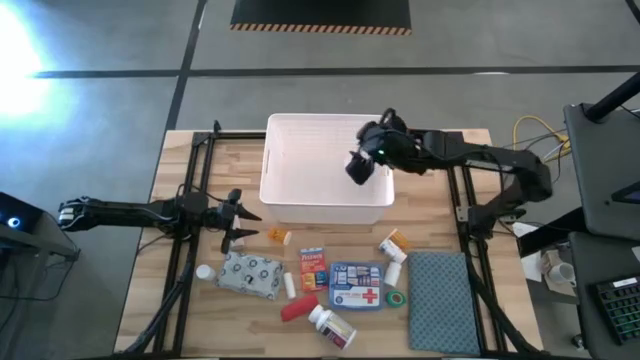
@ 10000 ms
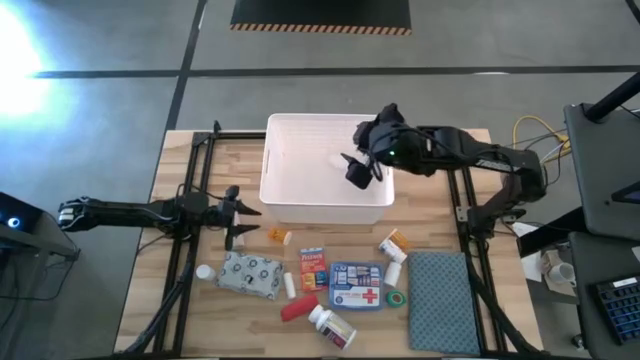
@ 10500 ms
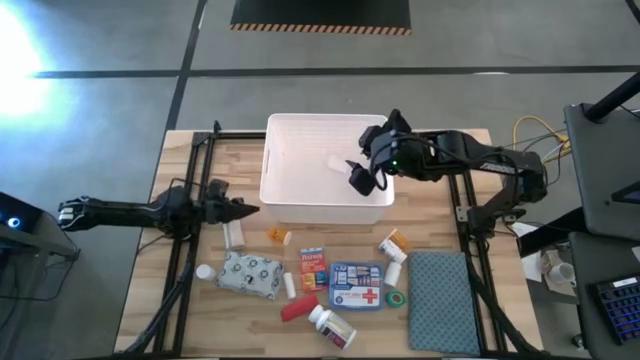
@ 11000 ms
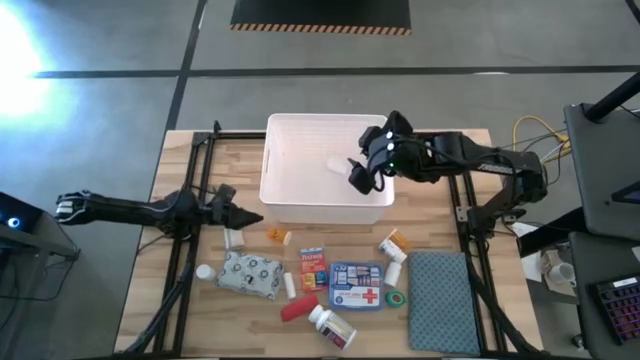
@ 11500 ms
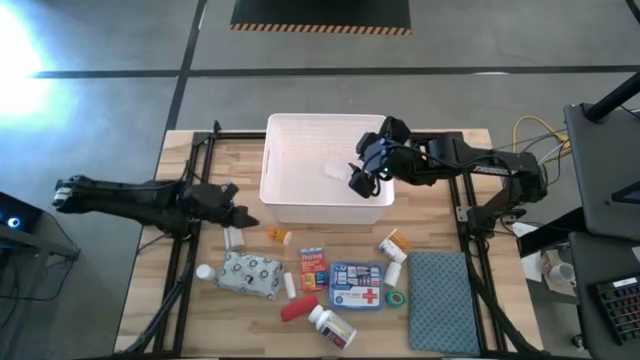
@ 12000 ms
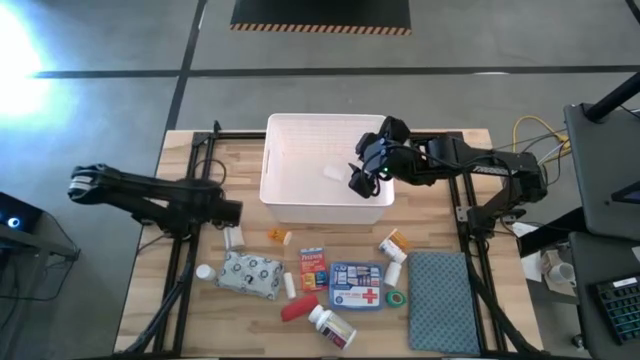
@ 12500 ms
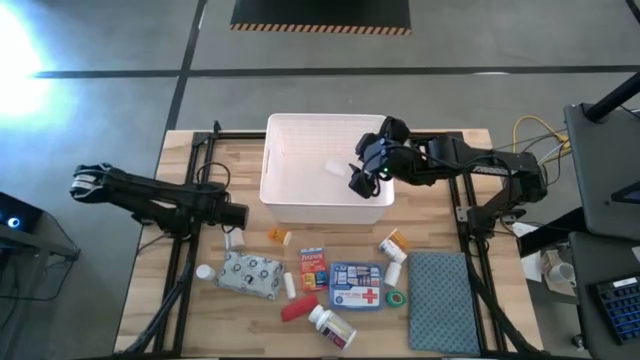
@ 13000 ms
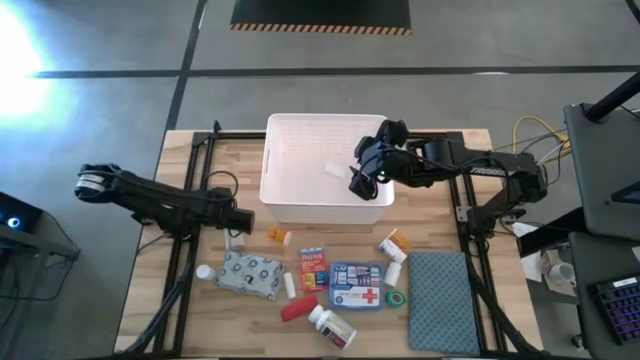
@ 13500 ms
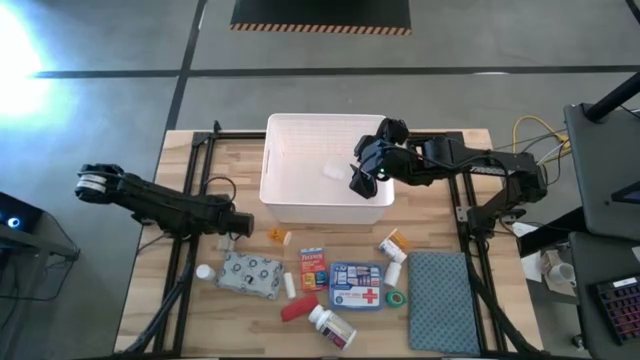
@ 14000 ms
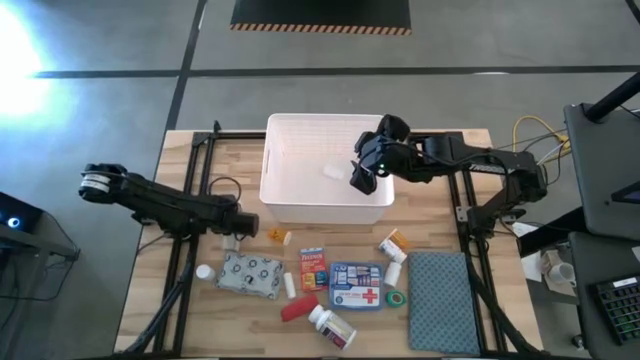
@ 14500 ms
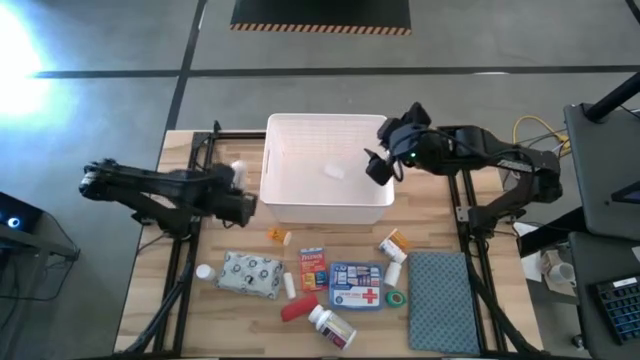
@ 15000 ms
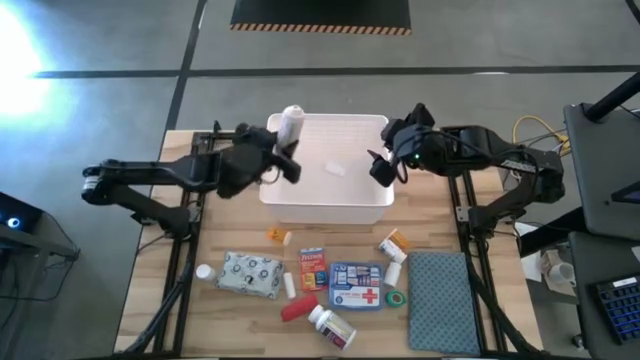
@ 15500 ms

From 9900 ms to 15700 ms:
Task: Pick & place medical supplies in basket/bin
Put the white bandage into the white bin

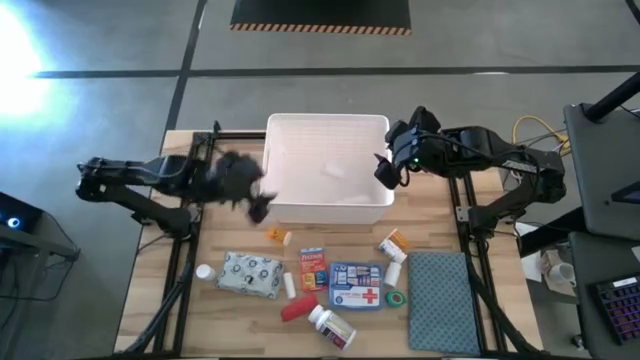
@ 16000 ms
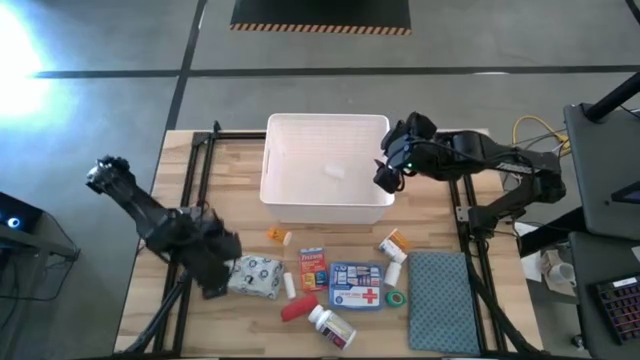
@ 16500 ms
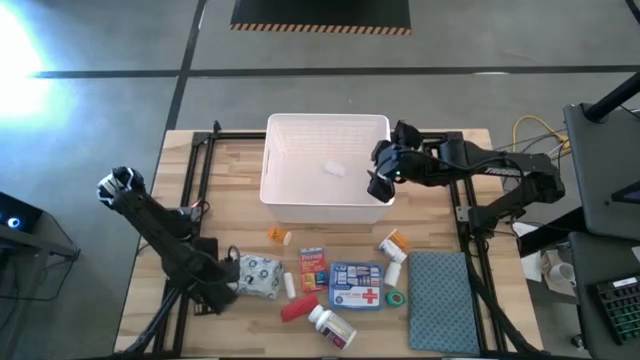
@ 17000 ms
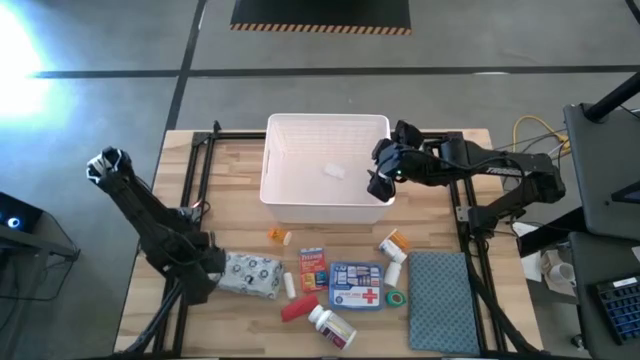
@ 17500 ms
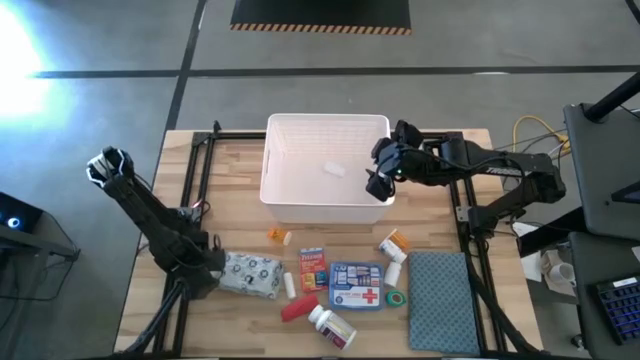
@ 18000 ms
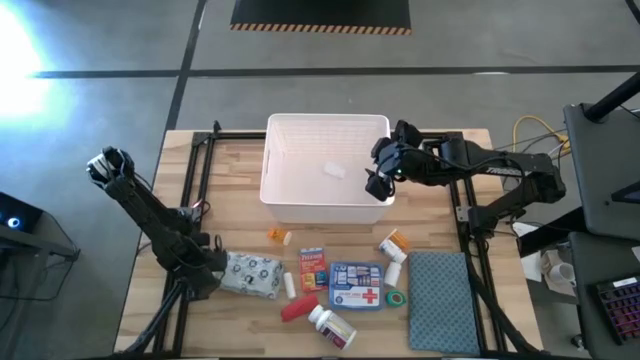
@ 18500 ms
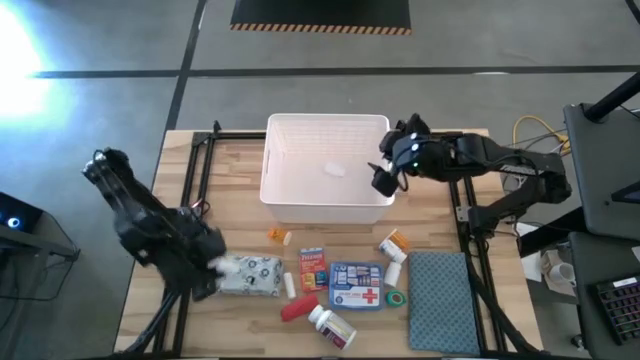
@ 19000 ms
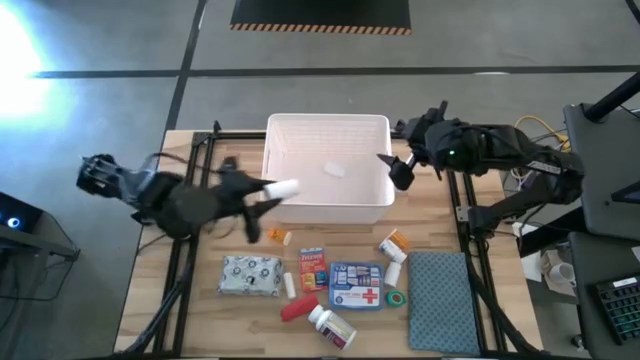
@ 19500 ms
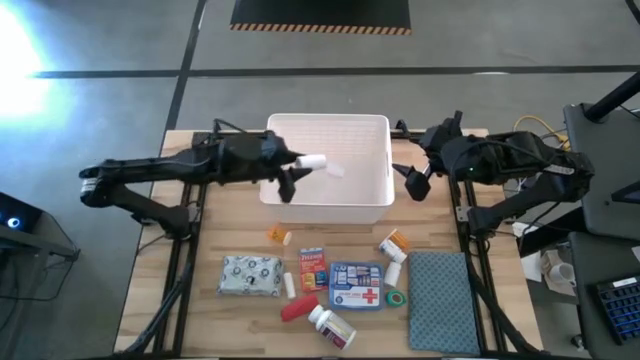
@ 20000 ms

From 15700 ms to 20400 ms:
Put the white pill bottle into the white bin

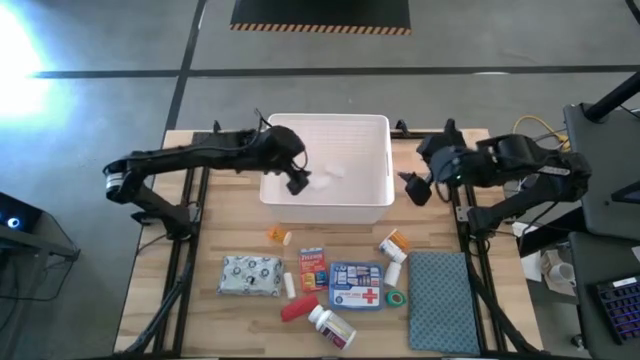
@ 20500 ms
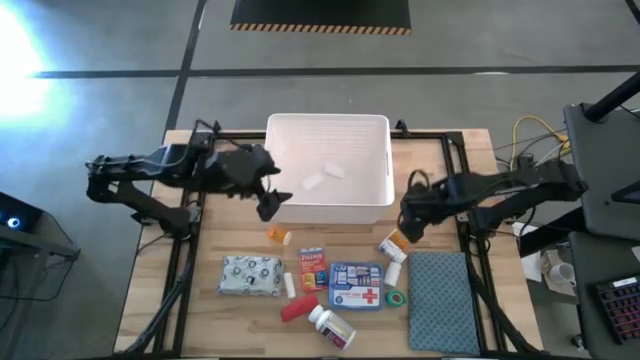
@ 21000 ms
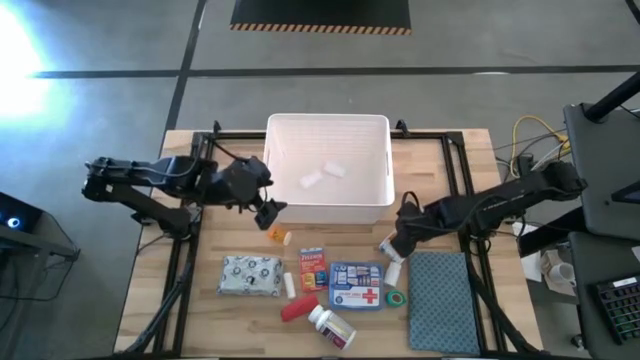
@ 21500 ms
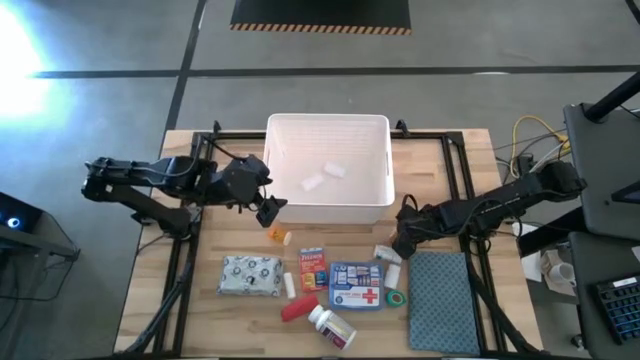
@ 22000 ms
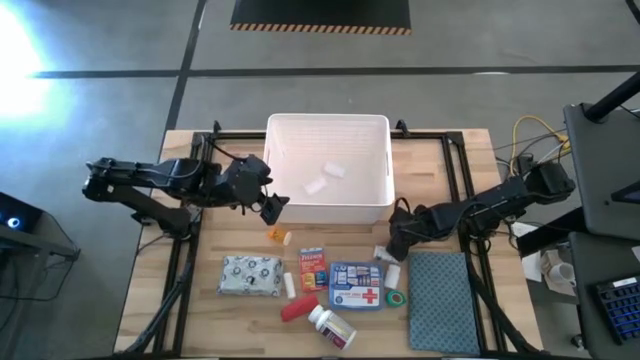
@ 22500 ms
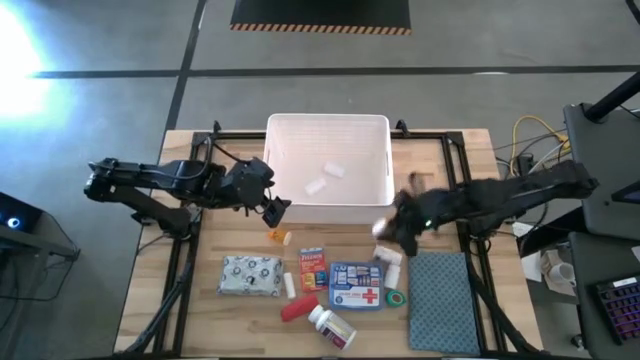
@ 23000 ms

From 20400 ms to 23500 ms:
Put the yellow pill bottle into the white bin

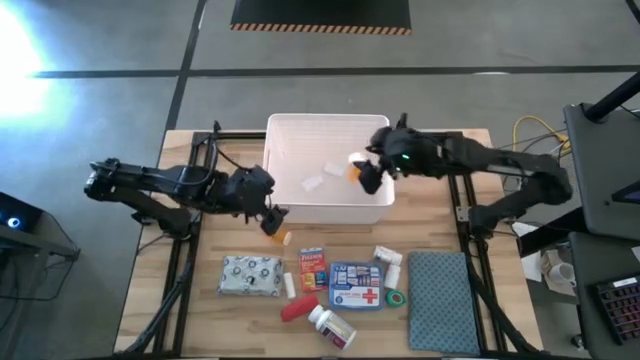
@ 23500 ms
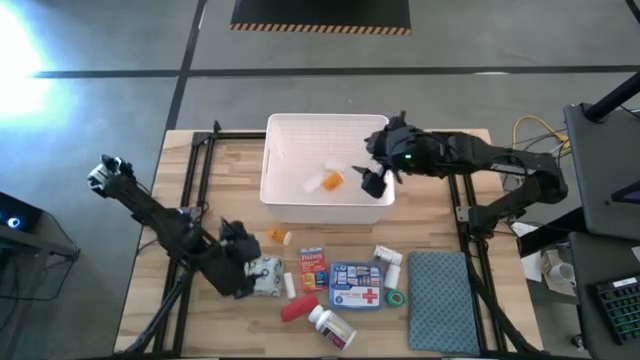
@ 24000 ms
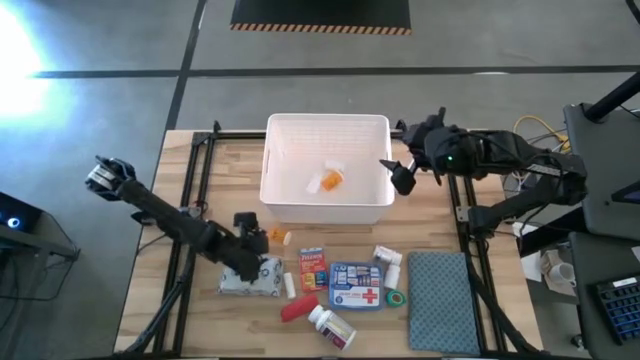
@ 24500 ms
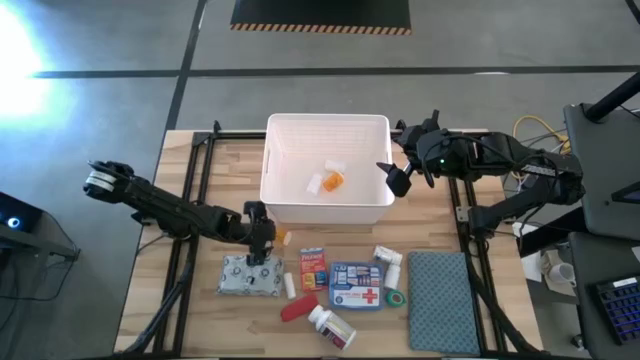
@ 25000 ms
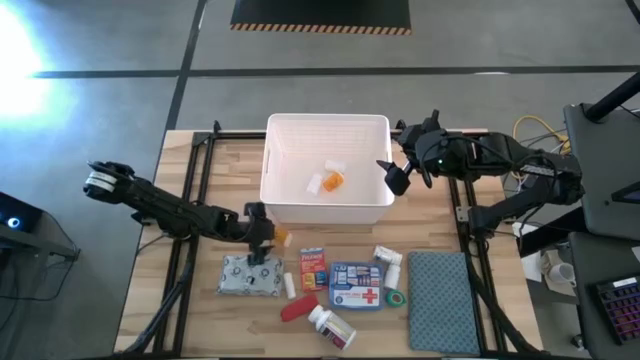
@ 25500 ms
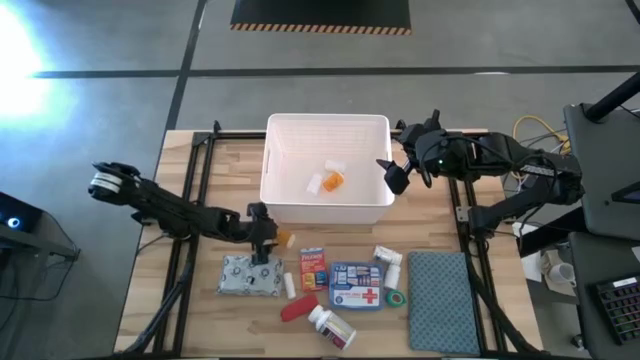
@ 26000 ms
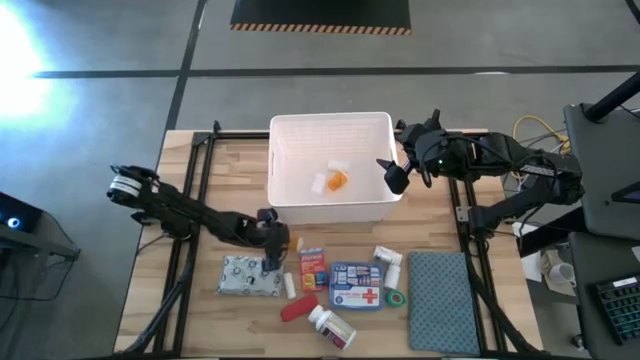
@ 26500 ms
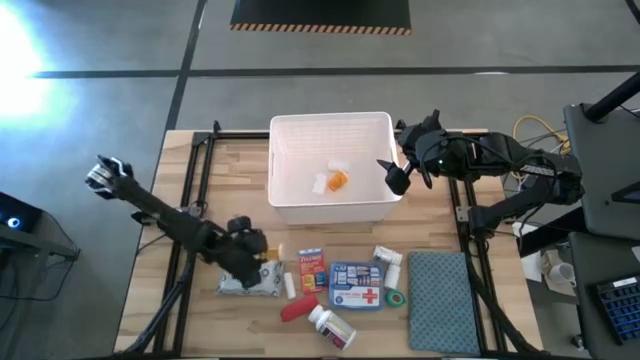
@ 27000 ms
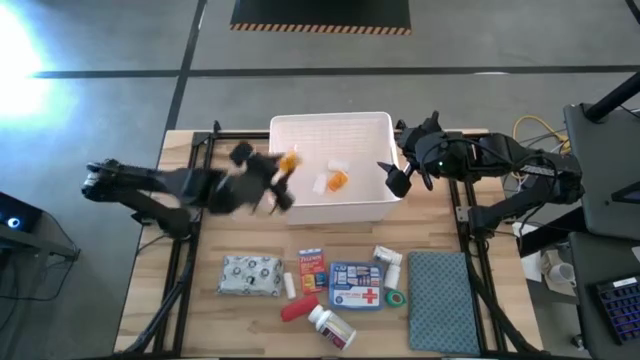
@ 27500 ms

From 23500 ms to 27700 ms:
Put the yellow pill bottle into the white bin

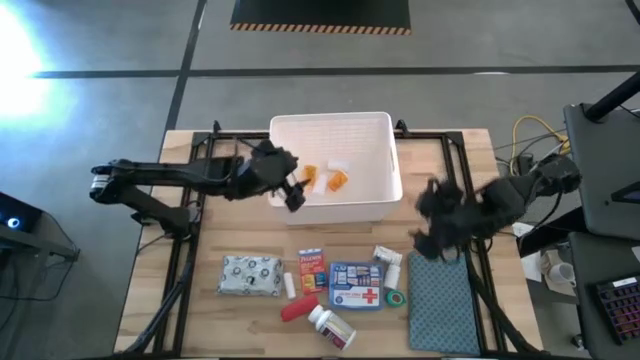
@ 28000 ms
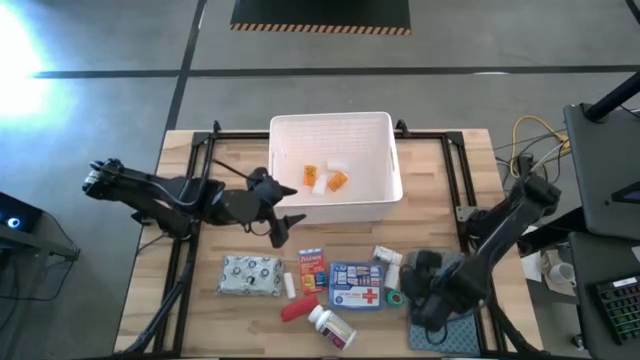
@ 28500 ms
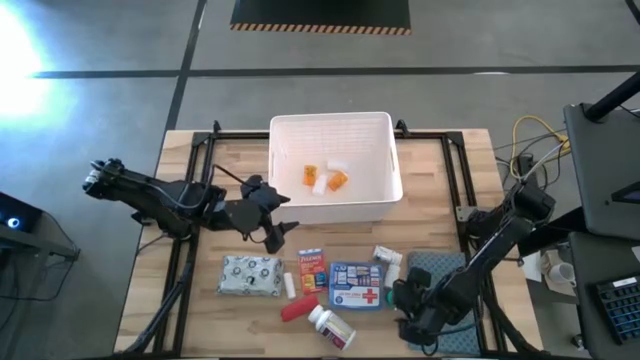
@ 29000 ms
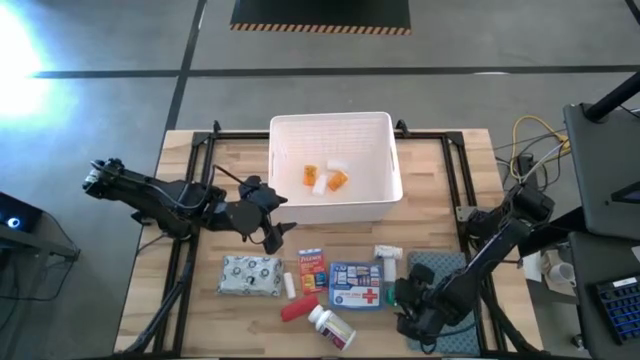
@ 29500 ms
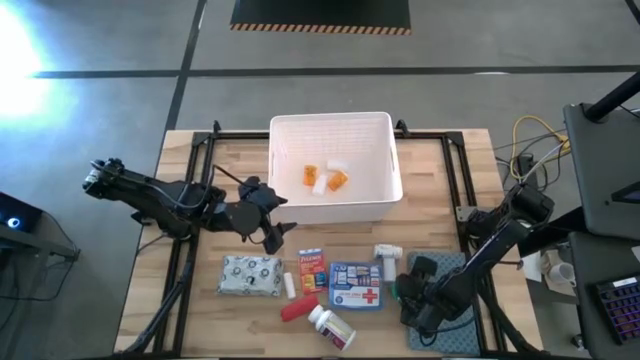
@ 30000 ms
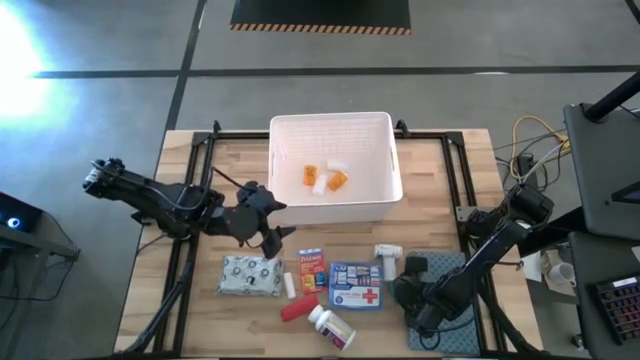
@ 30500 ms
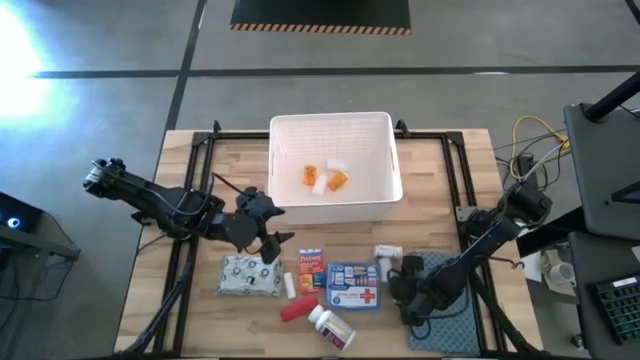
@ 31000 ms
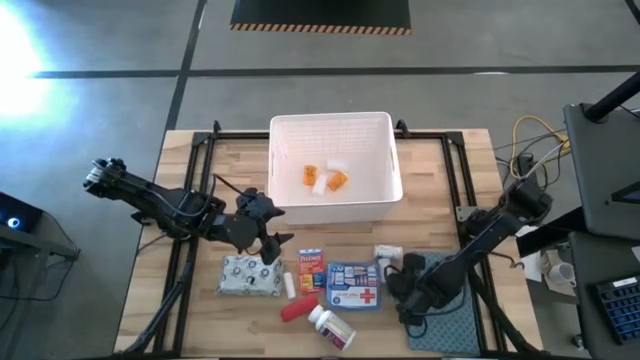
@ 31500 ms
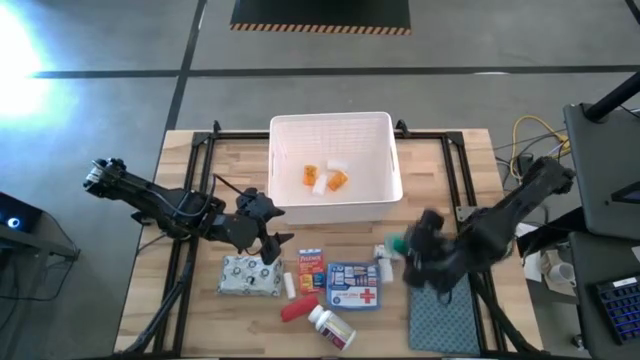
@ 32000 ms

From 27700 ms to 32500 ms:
Put the green bandage into the white bin
